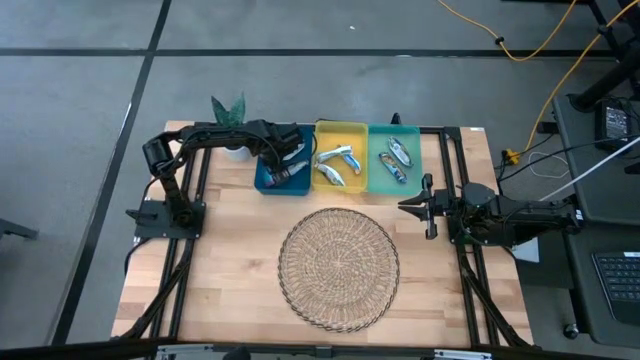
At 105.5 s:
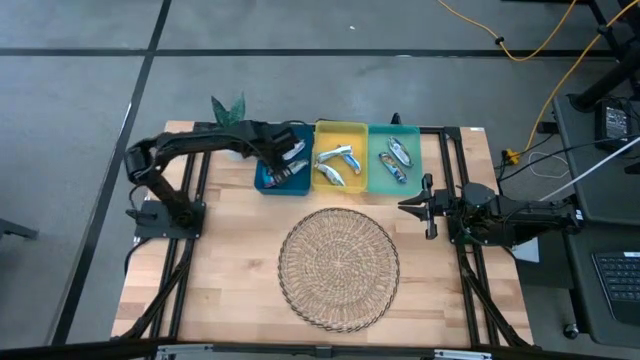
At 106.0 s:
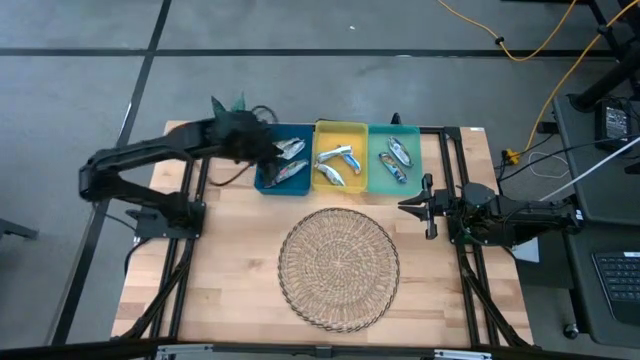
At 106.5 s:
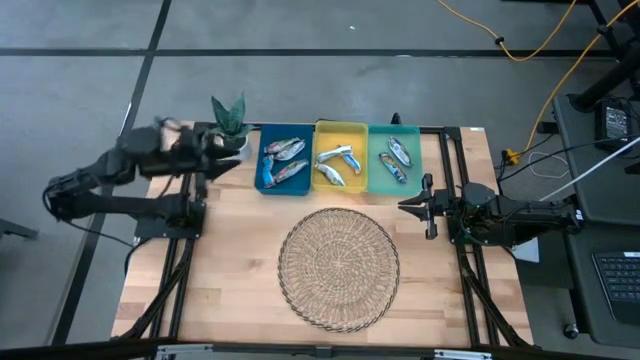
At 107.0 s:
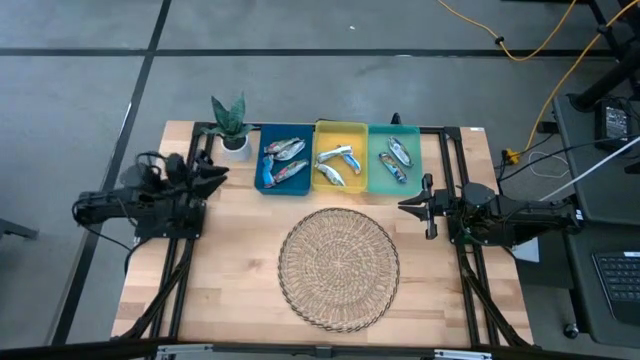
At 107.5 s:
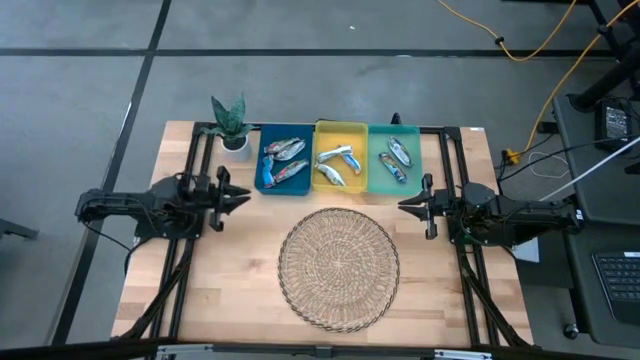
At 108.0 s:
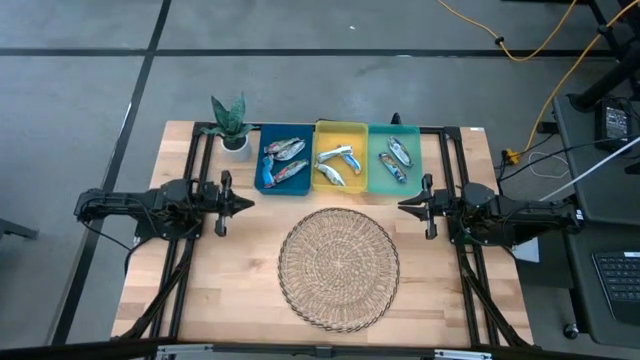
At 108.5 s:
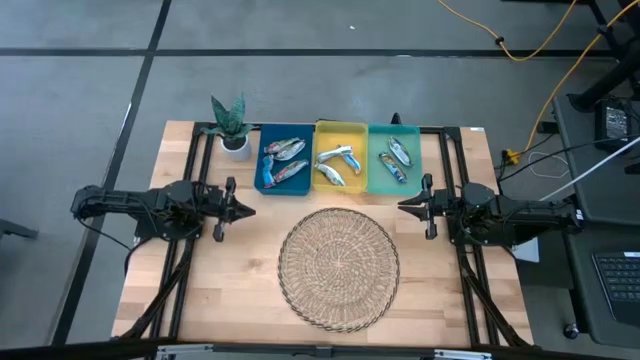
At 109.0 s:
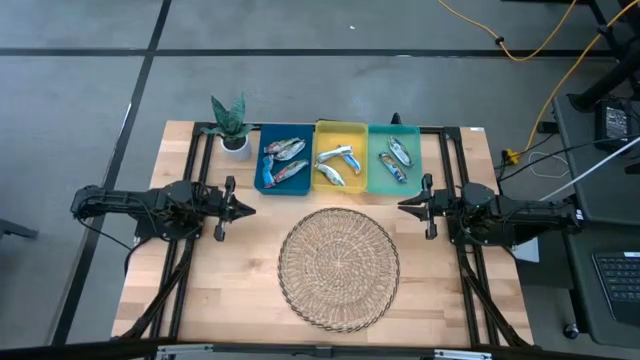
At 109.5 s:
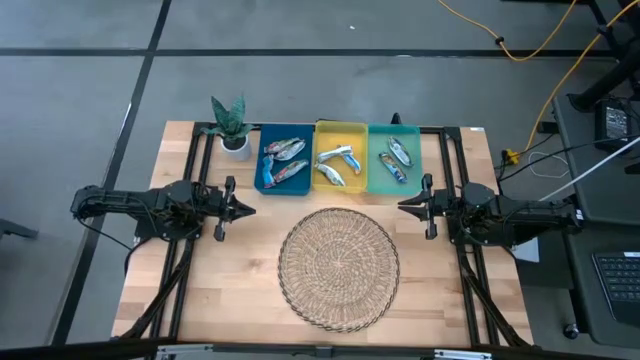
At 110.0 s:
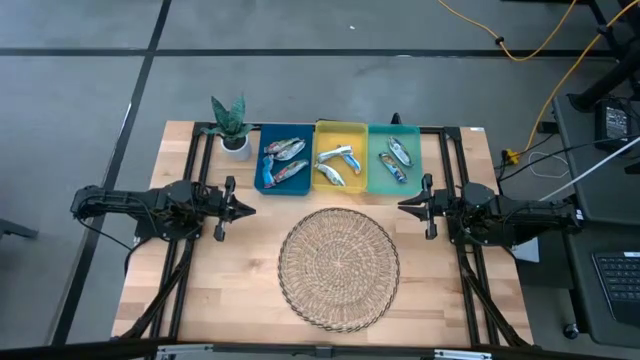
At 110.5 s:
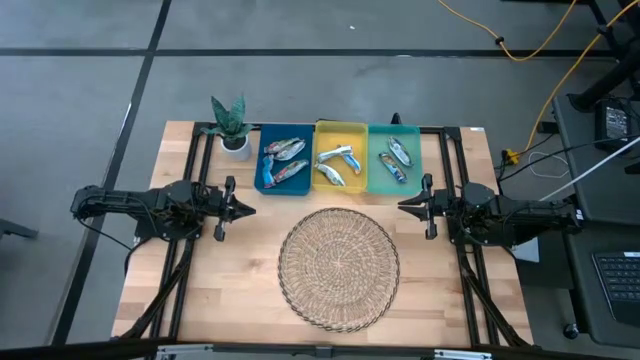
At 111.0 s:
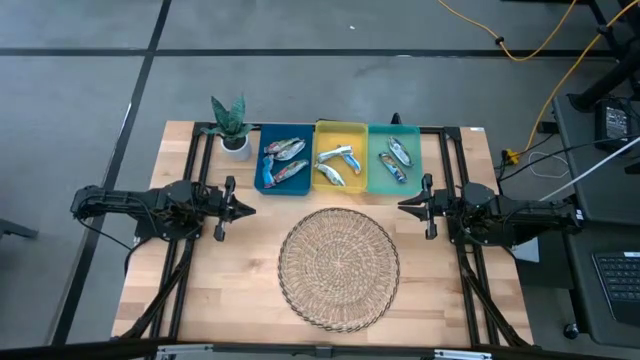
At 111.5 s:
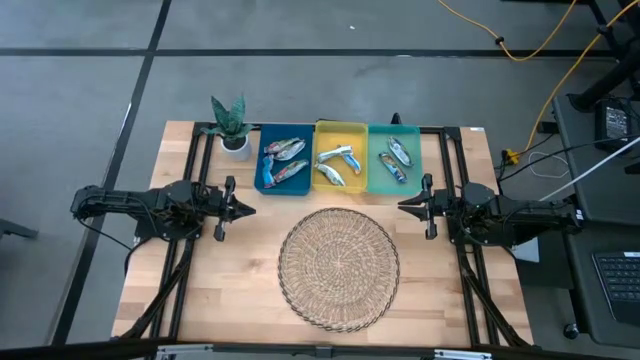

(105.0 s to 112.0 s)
Task: Pick and place Granola Bars by type
Return to Home Position

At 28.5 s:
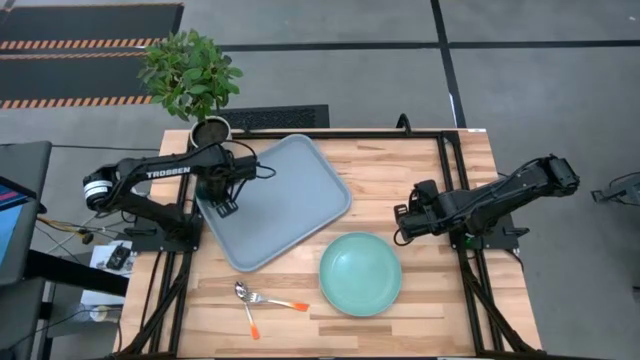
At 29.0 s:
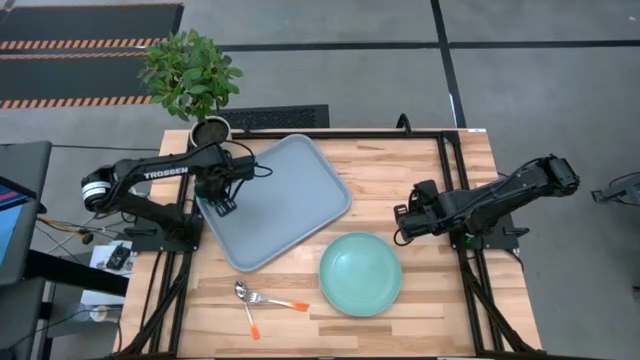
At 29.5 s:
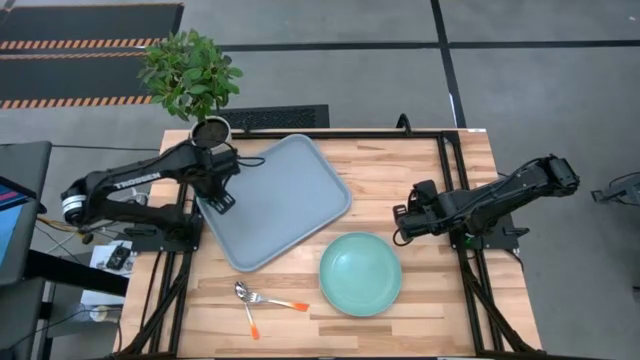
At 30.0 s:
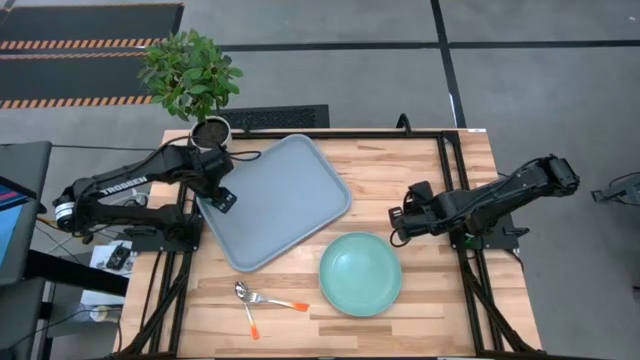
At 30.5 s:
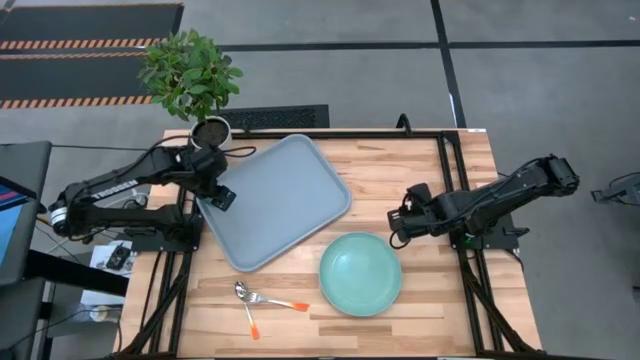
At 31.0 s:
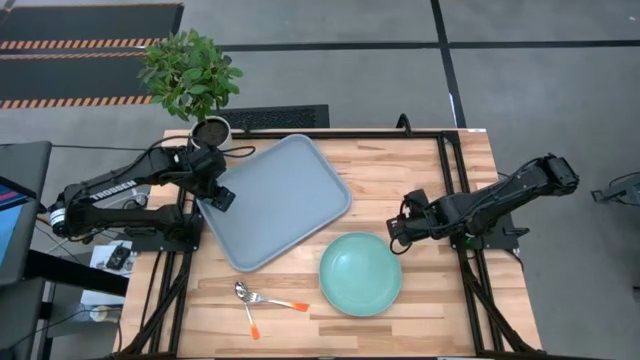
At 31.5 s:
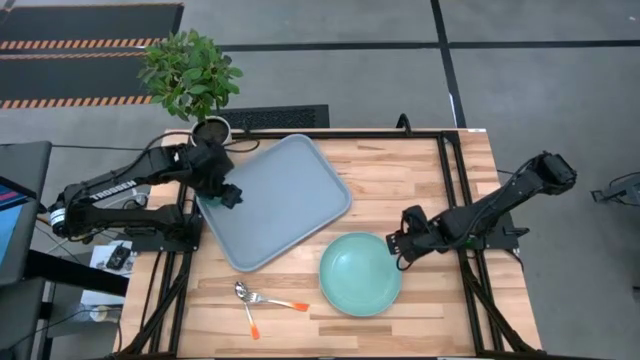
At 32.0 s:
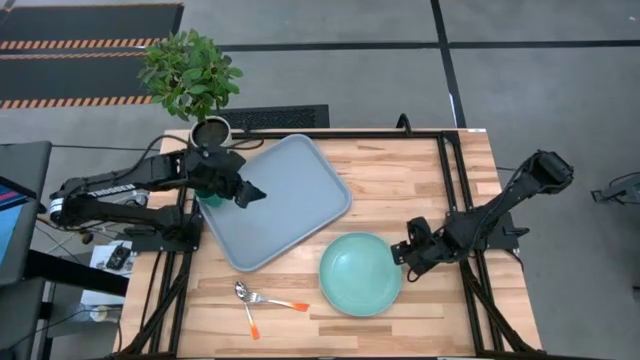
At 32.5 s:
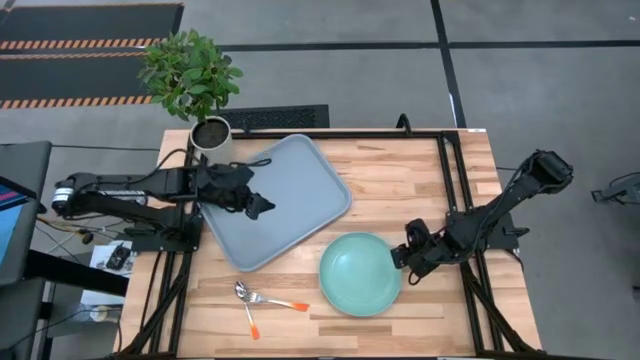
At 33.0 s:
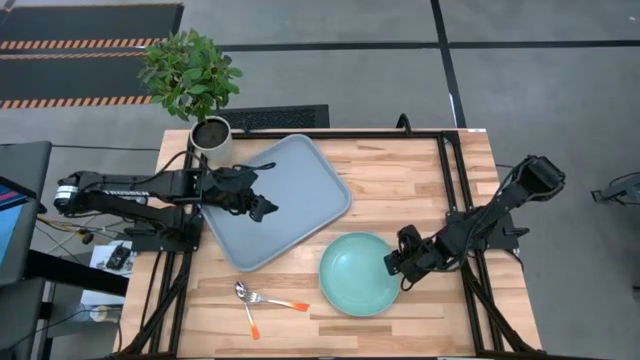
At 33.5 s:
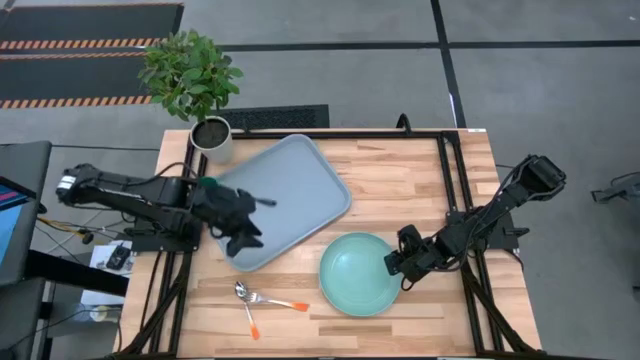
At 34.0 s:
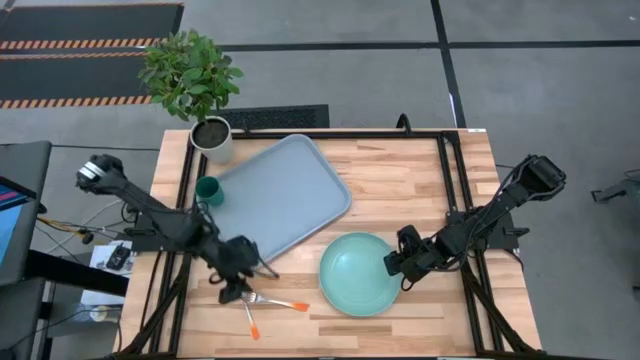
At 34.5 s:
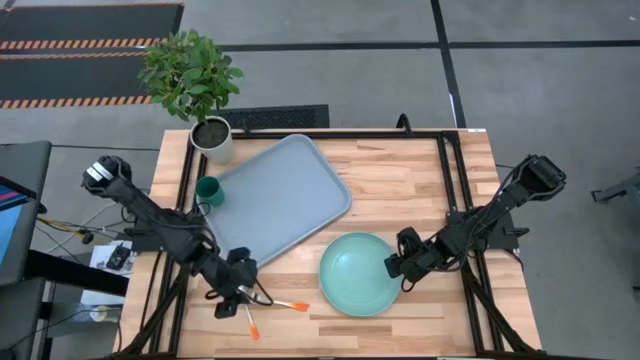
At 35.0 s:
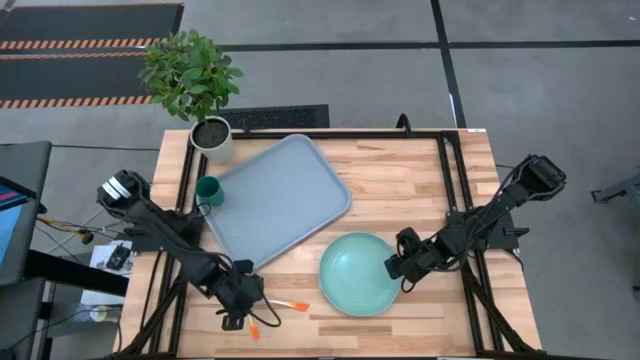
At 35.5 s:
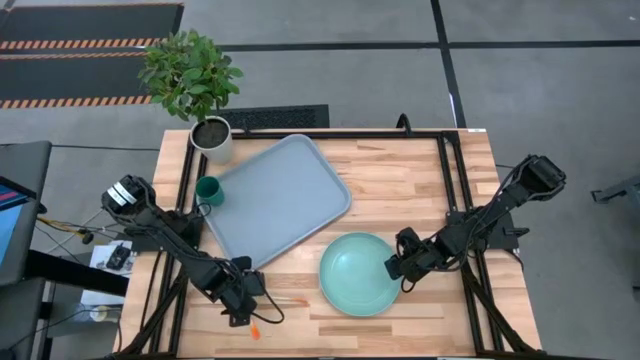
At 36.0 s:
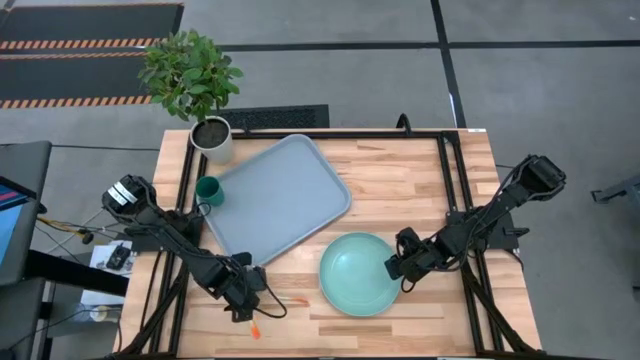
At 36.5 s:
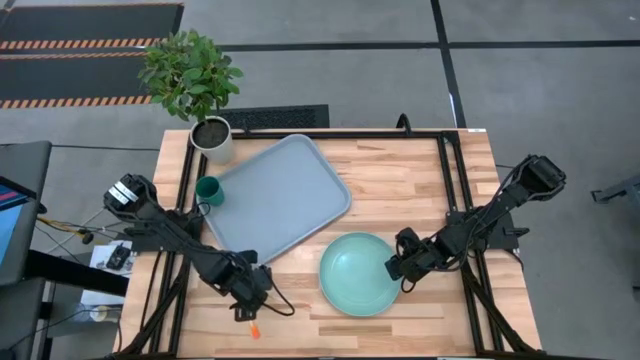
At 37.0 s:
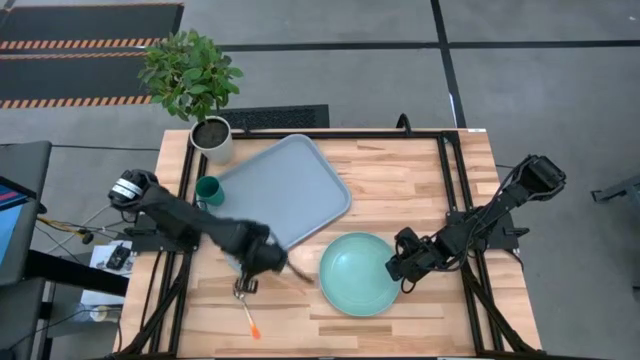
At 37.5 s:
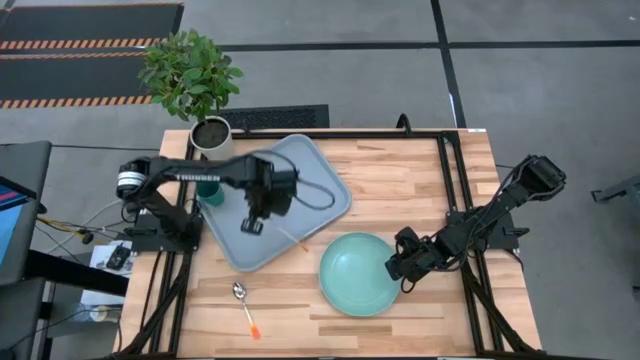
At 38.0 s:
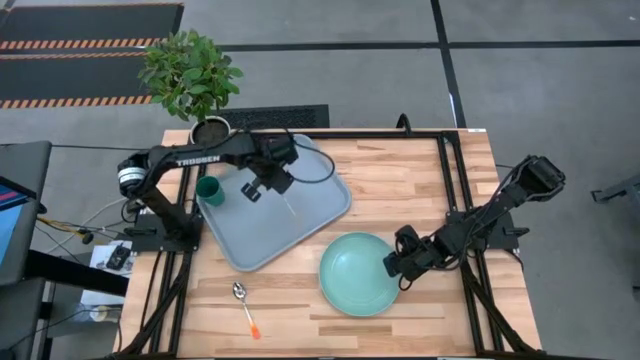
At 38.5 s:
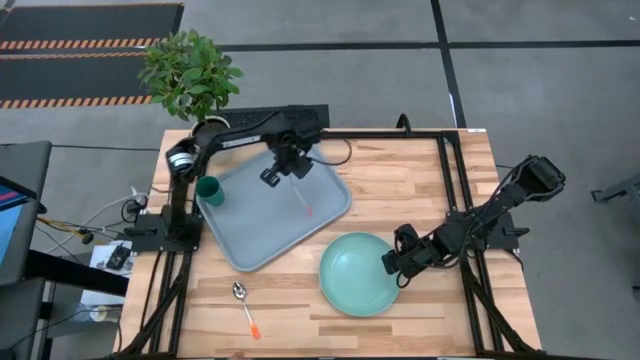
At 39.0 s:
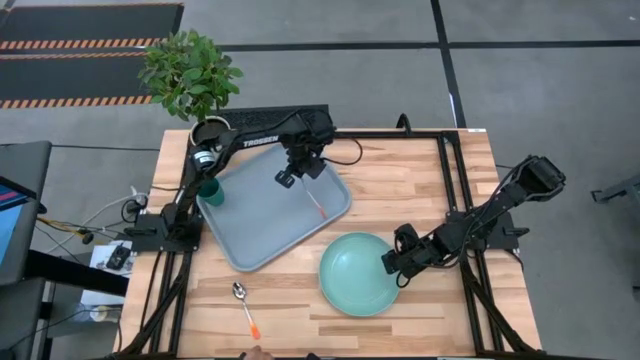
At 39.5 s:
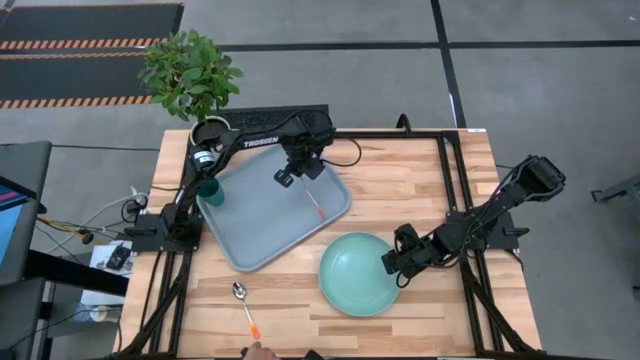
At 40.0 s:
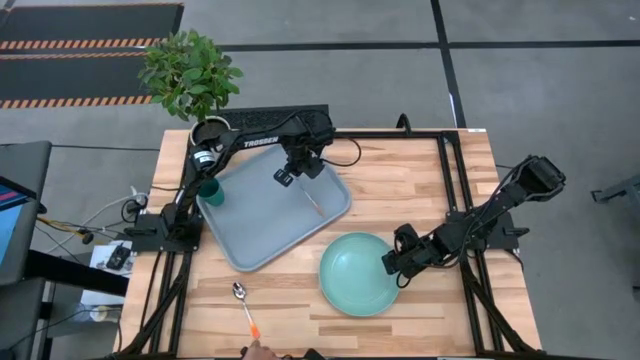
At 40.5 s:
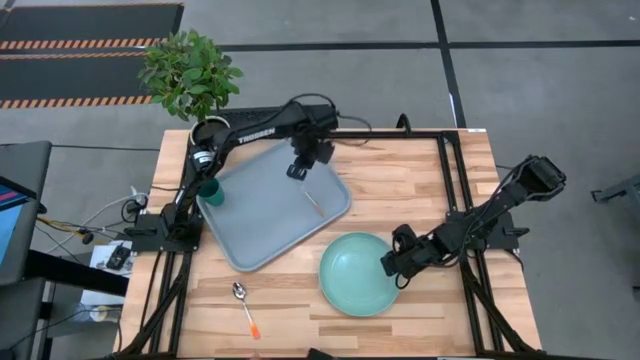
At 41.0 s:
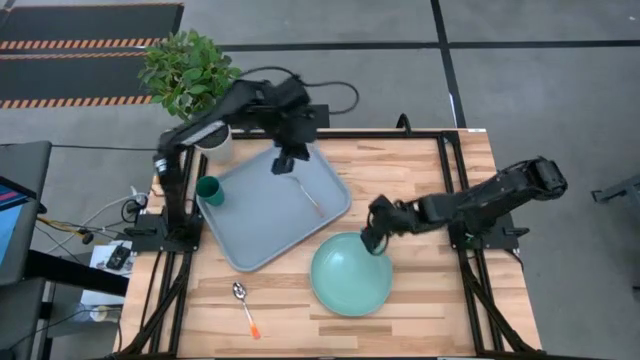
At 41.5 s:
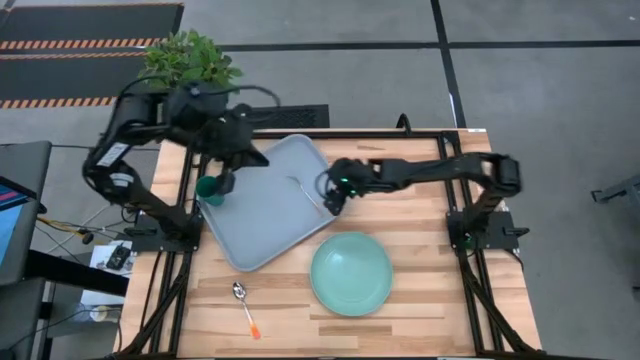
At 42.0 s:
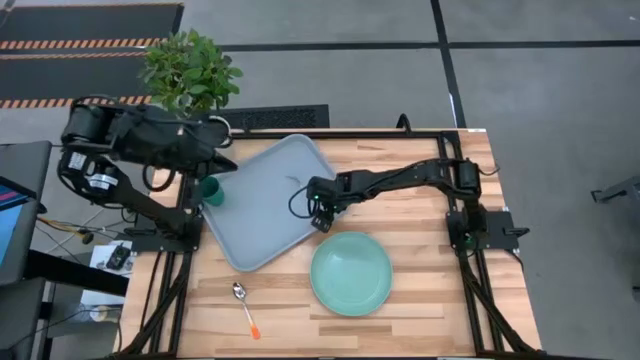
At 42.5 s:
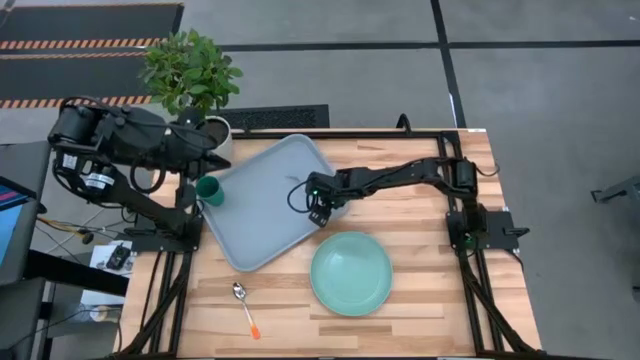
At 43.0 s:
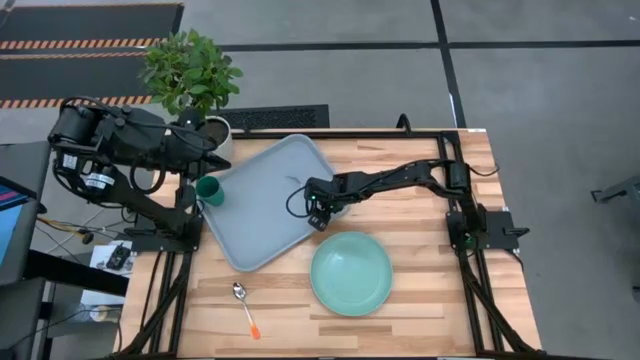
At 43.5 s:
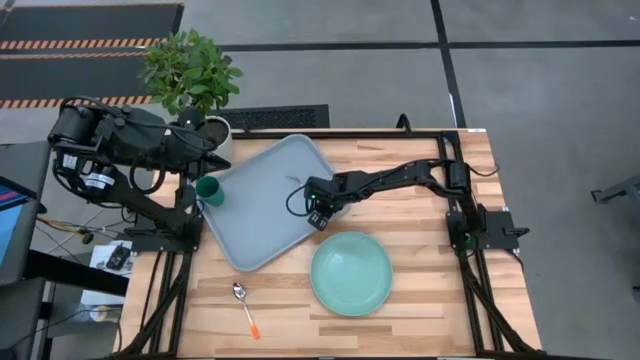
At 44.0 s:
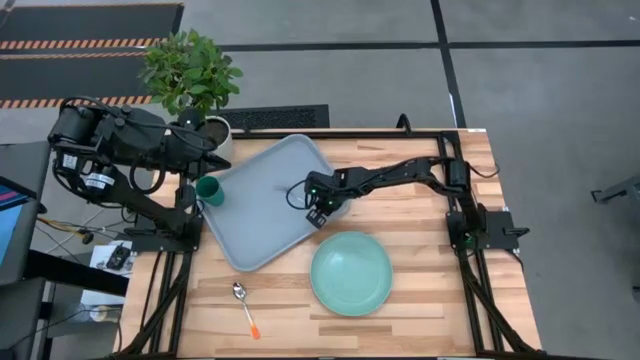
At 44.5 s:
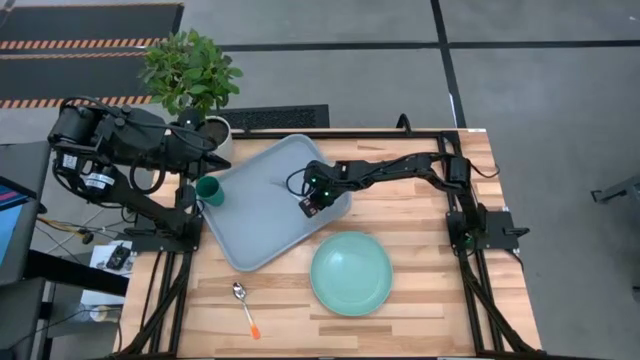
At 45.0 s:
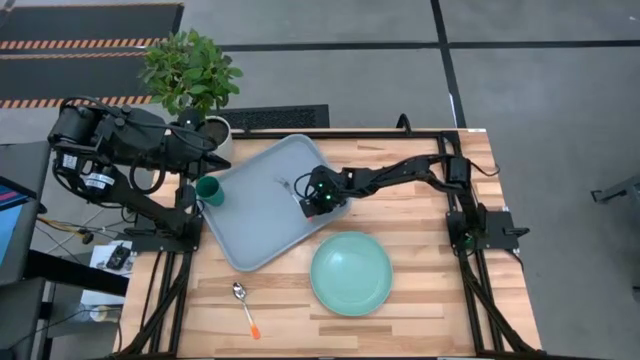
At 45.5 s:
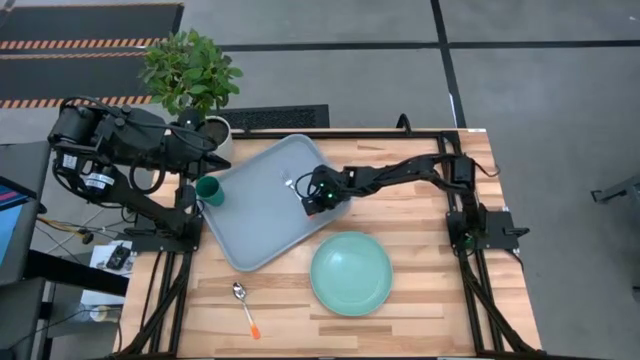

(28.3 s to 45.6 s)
Task: Pick and place plate/cup/fork/spoon on tray
Put the orange fork on the gray serving tray
